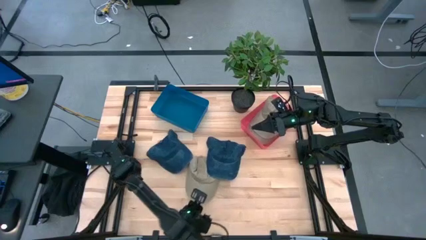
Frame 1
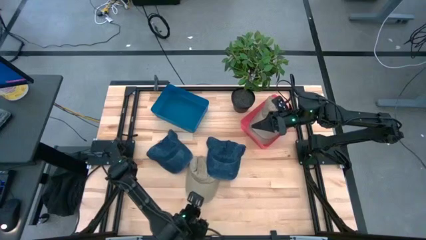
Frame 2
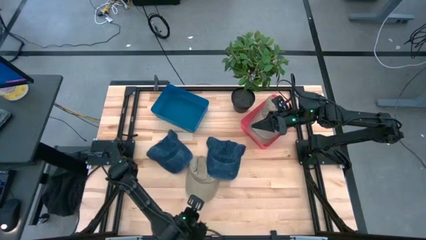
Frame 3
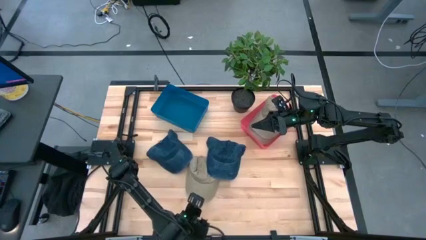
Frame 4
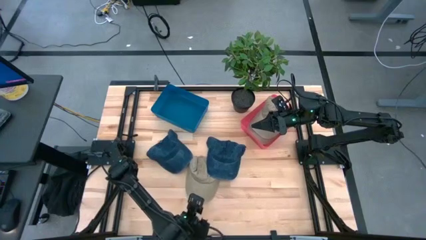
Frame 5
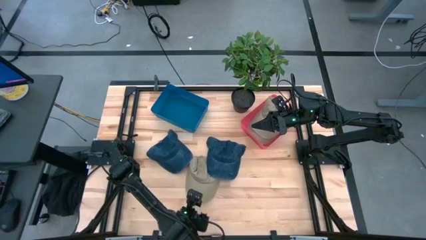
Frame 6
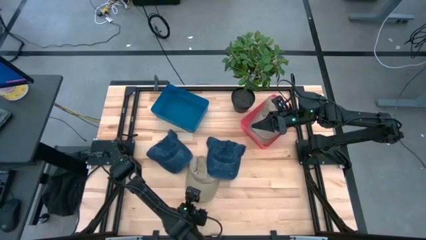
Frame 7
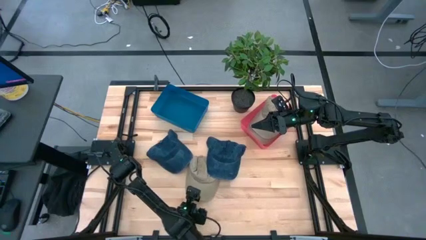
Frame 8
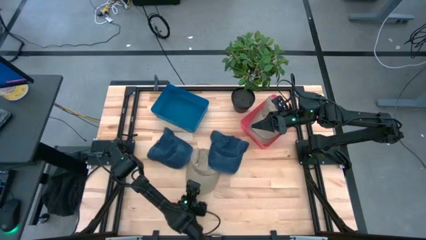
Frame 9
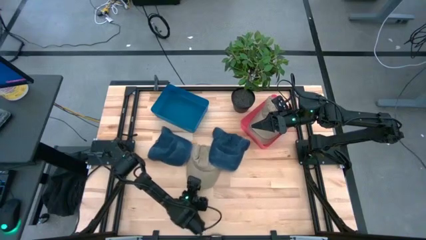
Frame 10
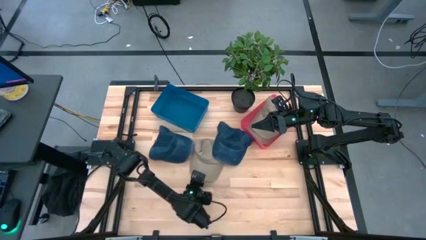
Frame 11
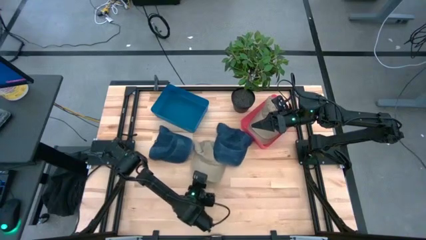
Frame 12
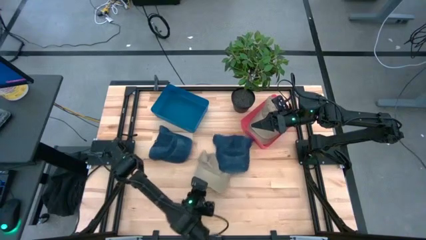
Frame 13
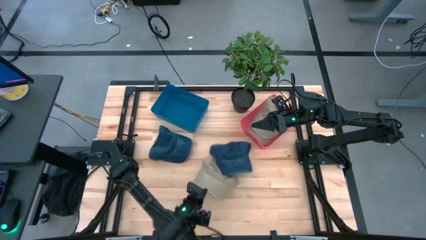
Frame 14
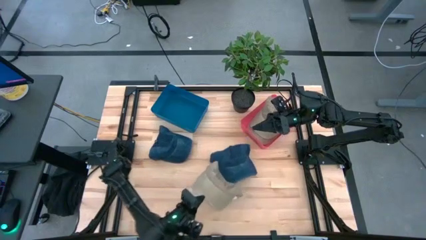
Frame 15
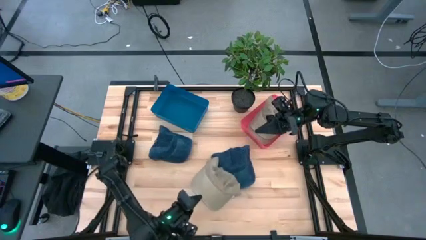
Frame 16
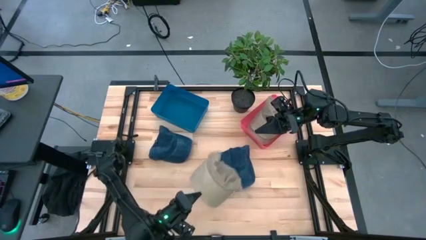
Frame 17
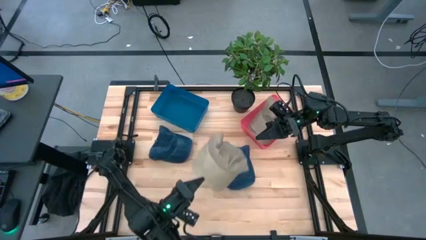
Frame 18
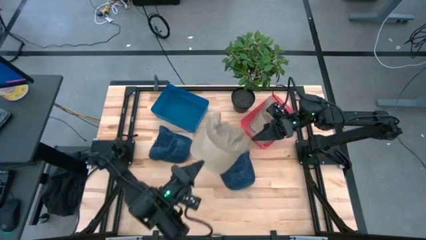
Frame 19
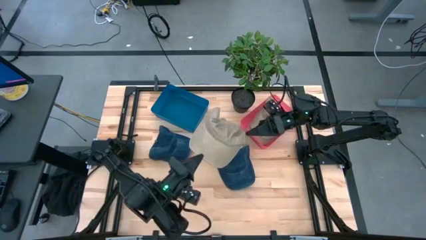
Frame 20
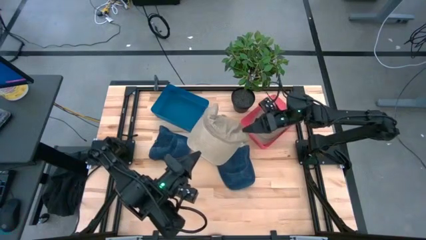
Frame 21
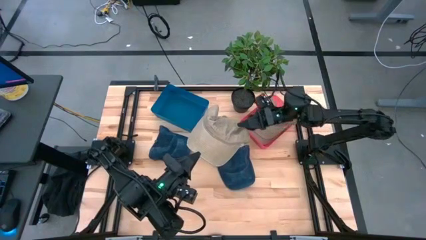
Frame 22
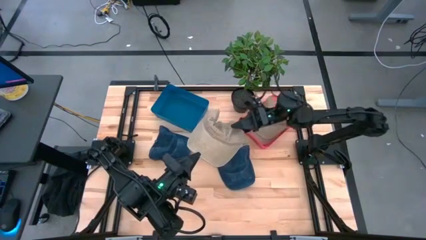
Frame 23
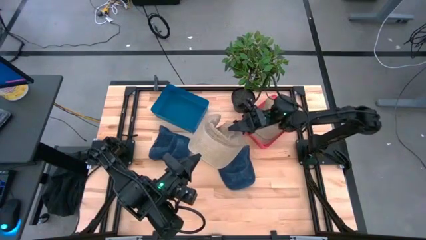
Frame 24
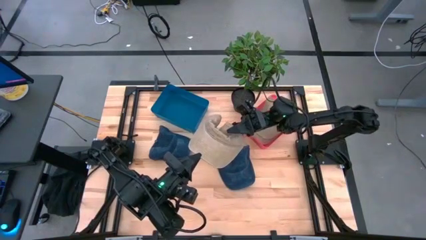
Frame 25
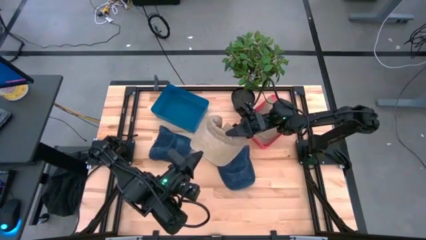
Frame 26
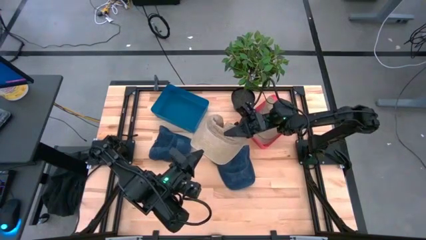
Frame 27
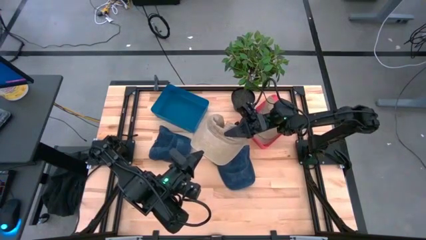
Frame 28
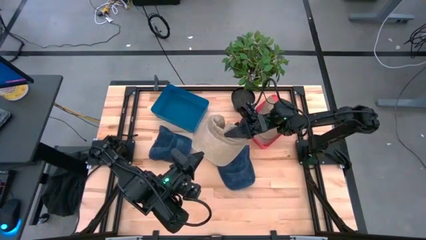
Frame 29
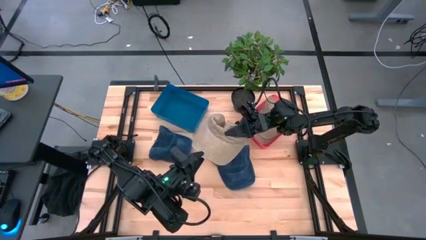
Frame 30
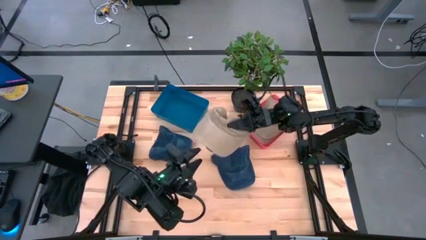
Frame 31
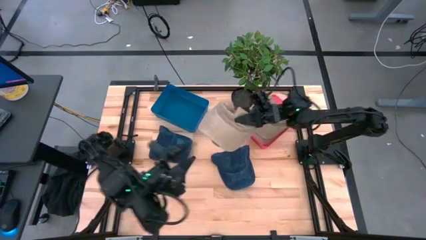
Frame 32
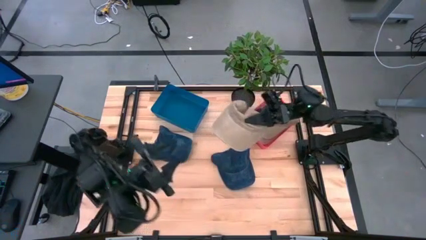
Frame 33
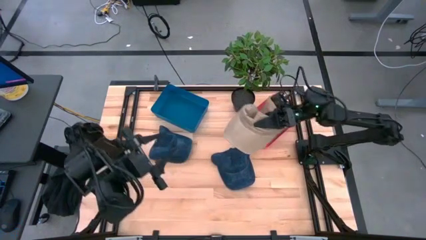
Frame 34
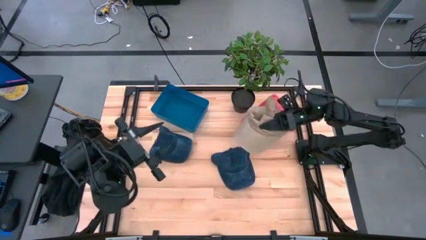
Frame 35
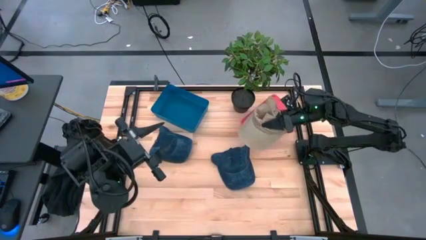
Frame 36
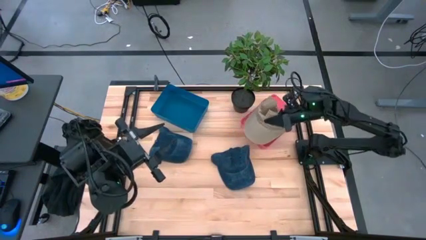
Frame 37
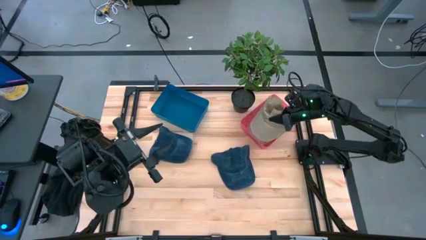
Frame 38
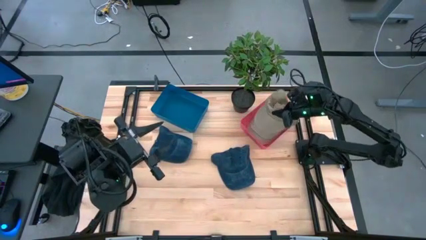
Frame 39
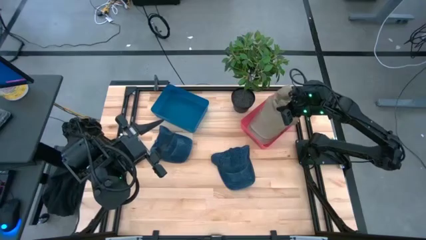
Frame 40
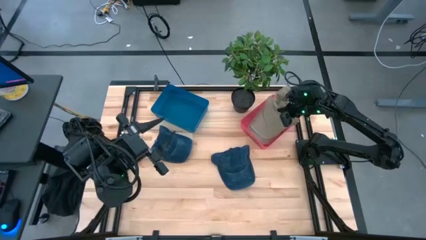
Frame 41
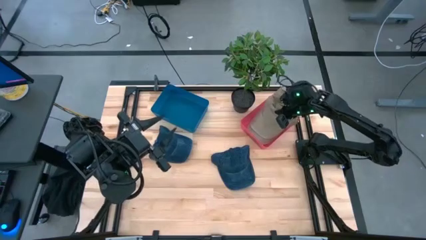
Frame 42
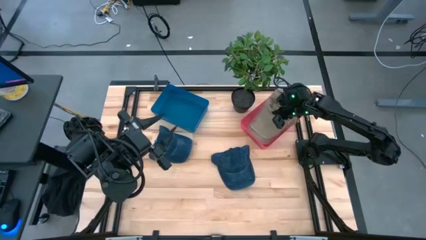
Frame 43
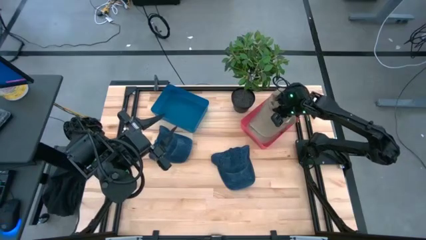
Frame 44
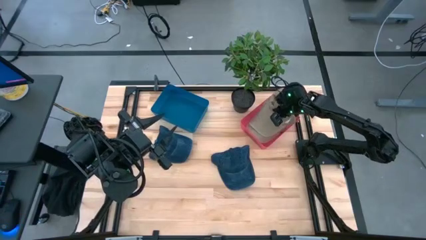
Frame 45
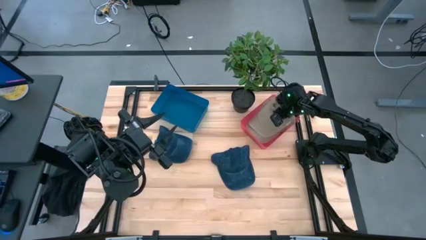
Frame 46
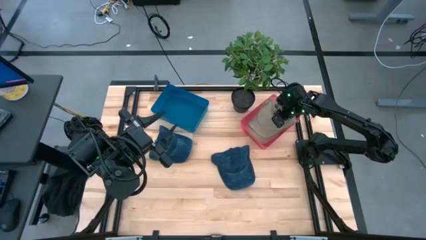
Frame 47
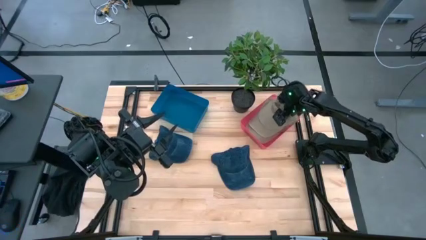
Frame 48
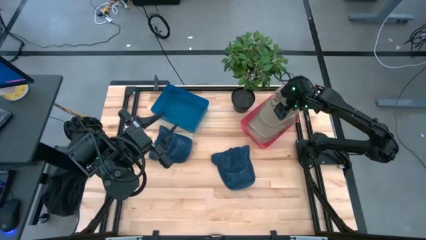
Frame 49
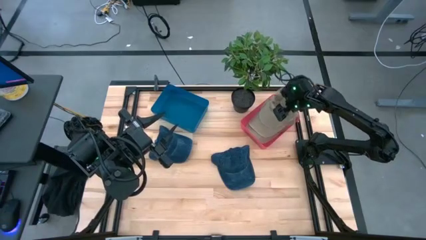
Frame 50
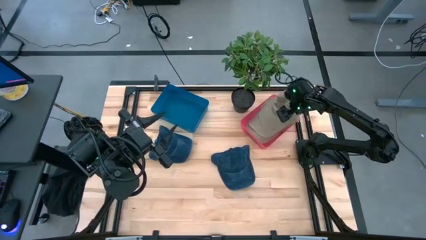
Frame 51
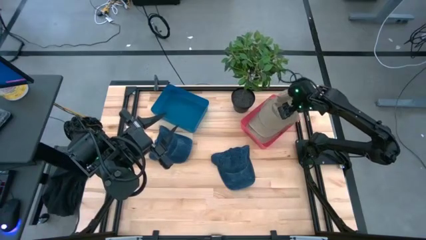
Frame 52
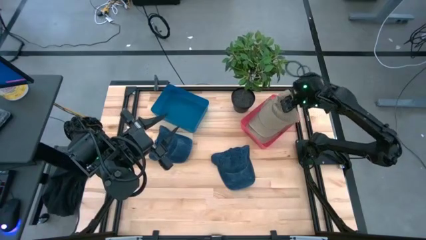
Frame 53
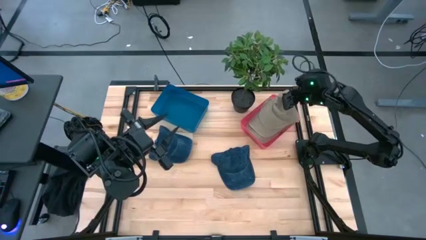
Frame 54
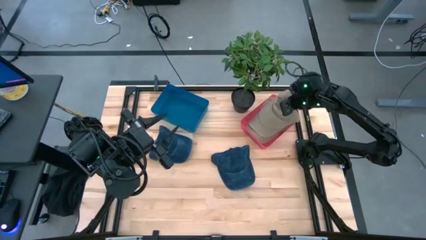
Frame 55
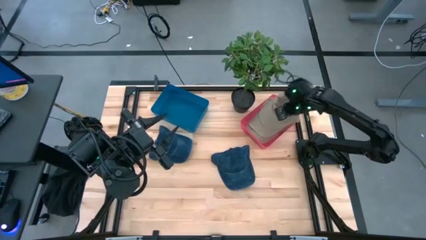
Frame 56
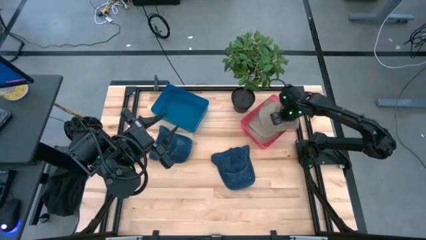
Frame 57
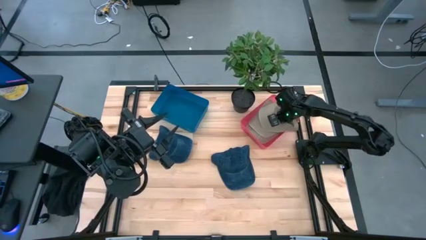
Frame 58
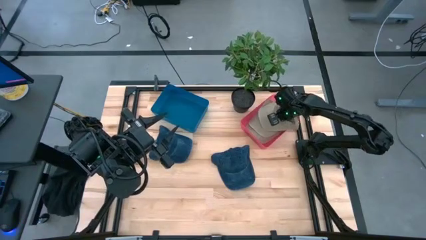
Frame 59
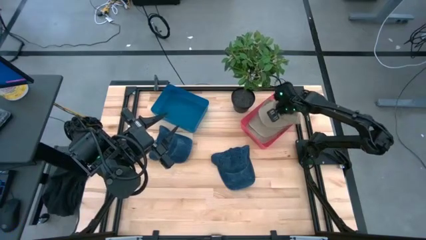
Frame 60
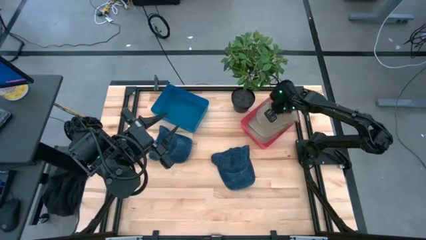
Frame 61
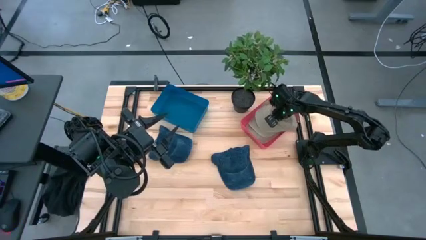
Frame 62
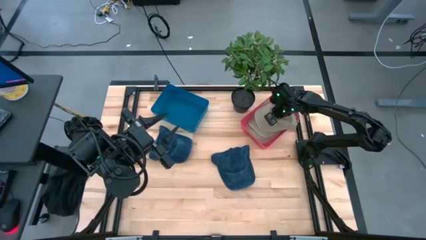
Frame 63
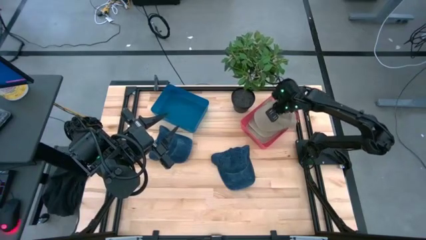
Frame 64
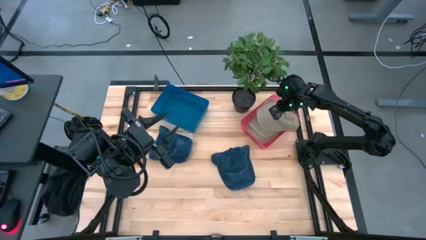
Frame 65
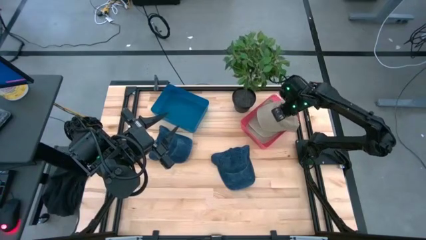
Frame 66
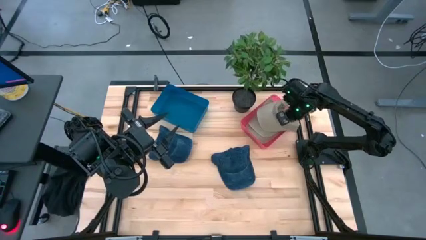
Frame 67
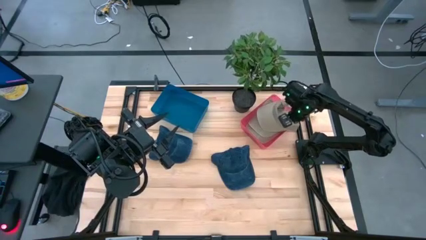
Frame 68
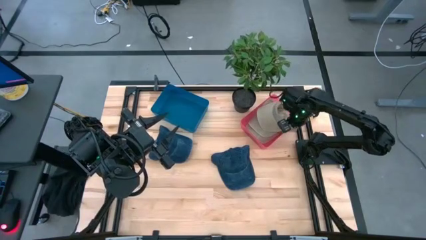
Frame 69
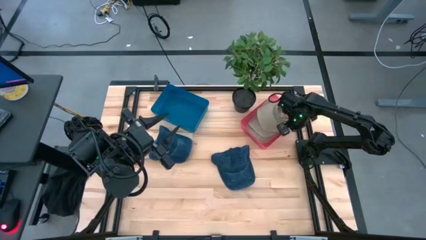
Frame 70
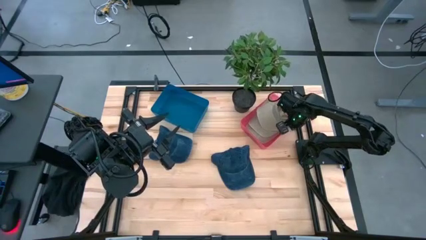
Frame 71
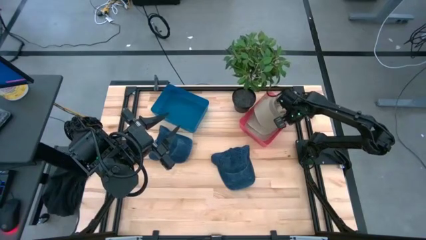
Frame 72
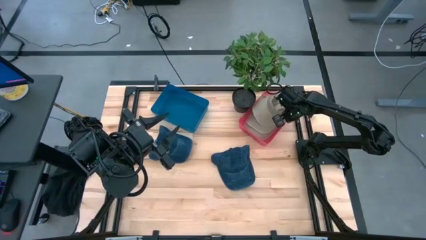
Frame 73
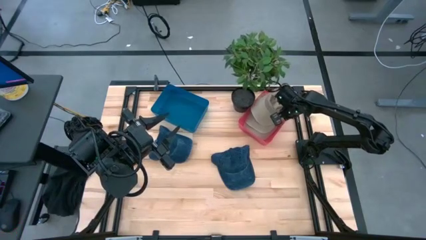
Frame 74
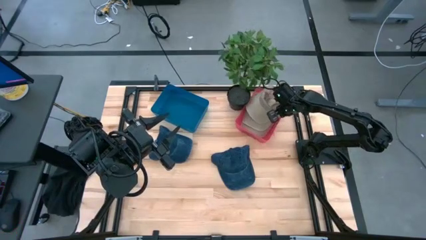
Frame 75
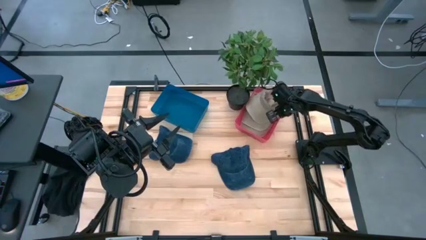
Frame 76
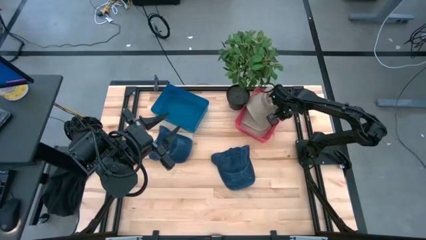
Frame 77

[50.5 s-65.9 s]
Task: Pick & Place hat
Put the brown cap into the red bin

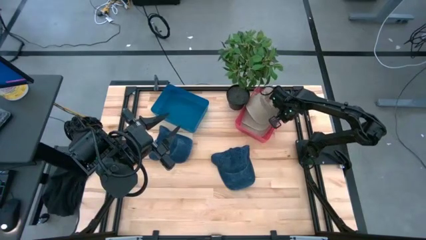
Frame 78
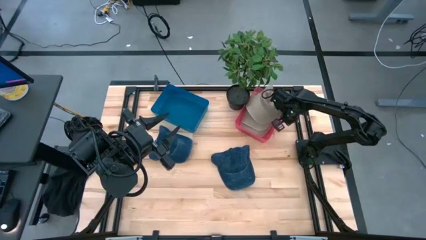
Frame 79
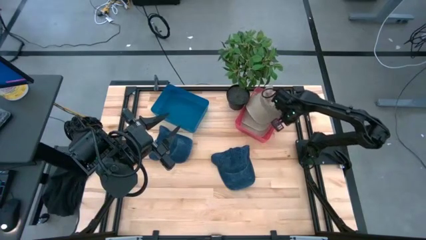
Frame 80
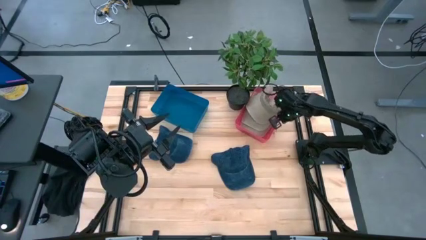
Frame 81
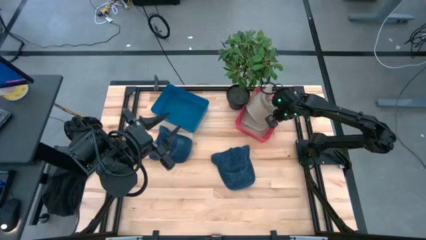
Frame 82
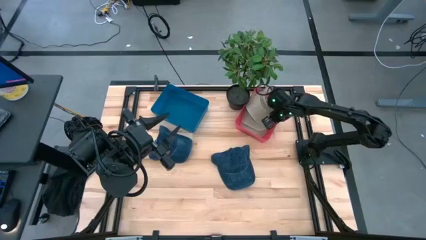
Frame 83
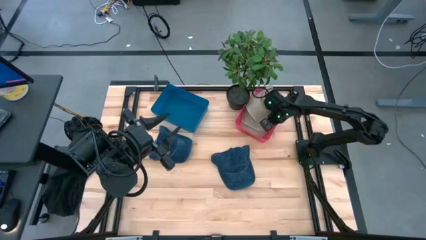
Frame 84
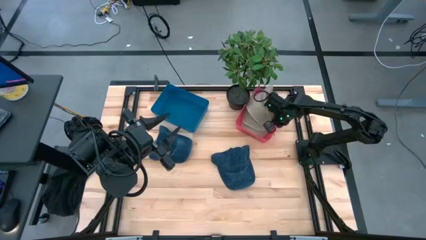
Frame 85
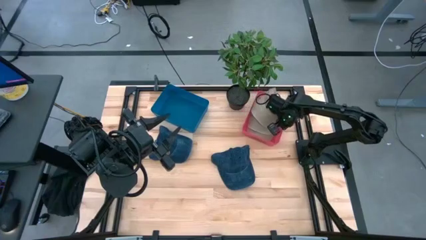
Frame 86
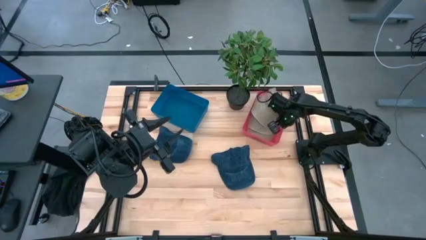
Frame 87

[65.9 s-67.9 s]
Adjust the red bin
